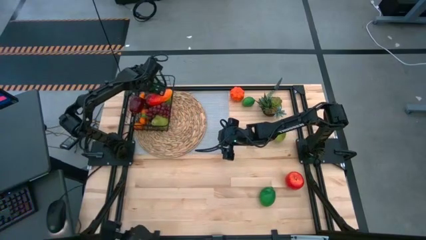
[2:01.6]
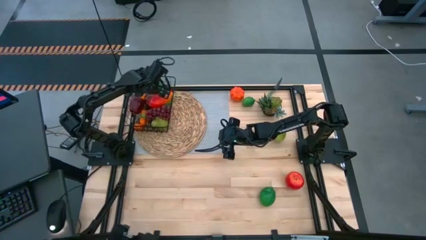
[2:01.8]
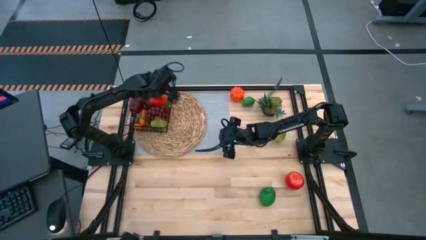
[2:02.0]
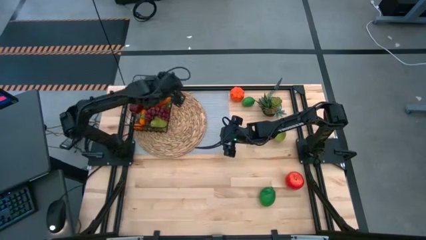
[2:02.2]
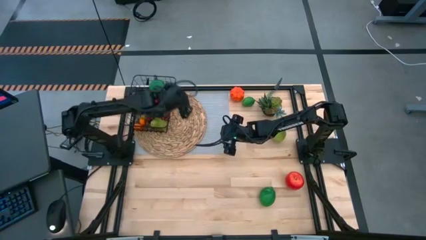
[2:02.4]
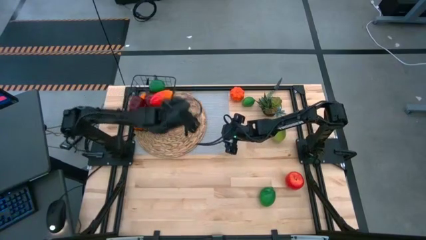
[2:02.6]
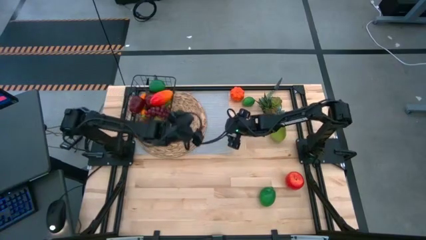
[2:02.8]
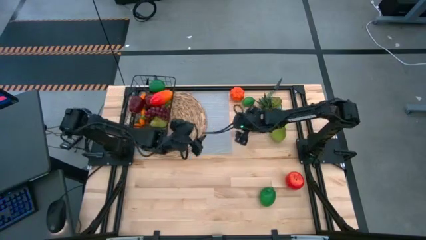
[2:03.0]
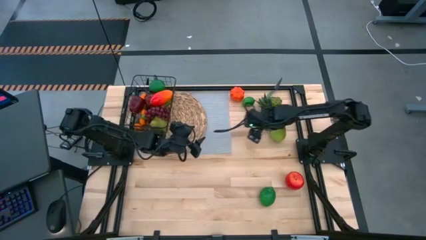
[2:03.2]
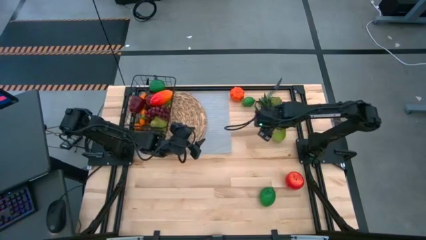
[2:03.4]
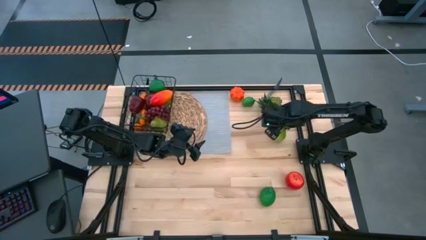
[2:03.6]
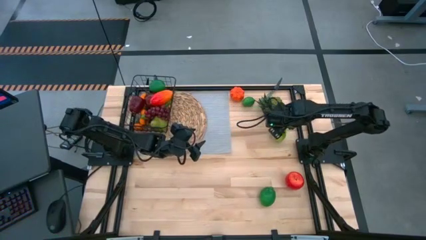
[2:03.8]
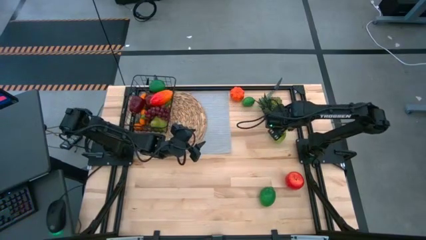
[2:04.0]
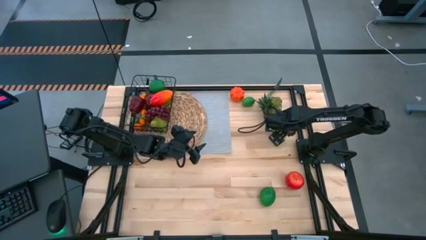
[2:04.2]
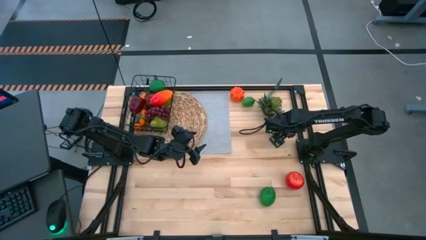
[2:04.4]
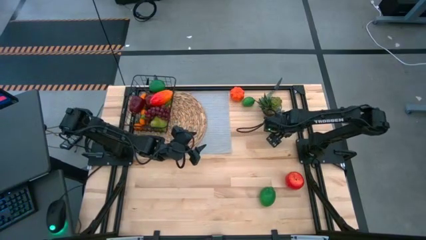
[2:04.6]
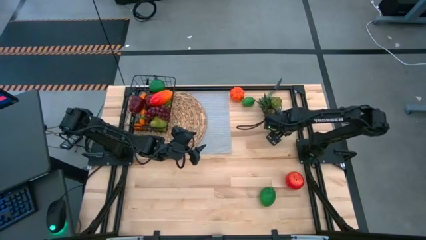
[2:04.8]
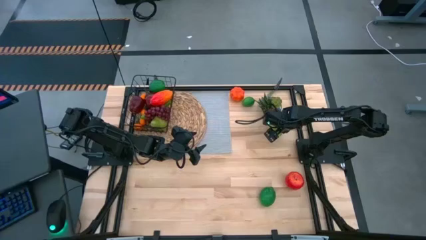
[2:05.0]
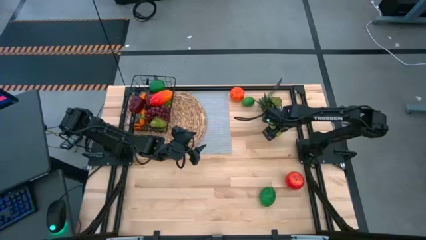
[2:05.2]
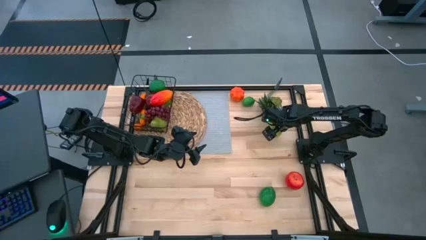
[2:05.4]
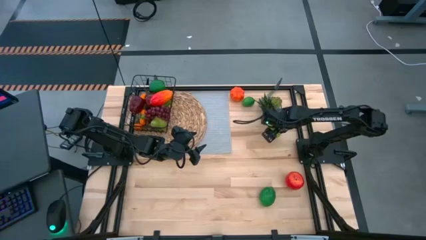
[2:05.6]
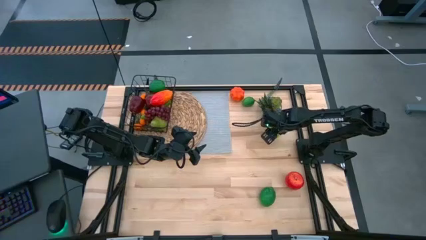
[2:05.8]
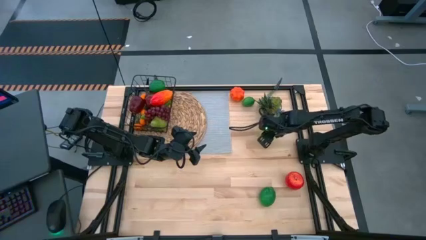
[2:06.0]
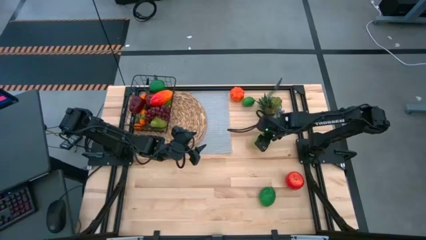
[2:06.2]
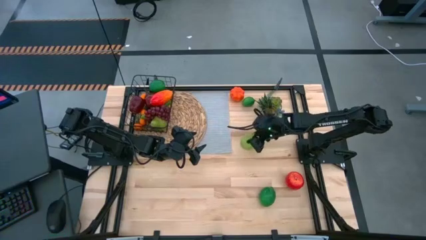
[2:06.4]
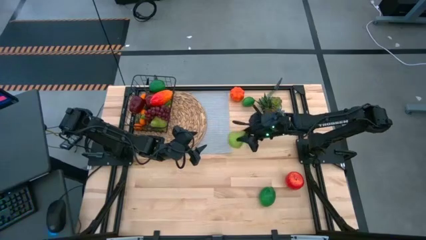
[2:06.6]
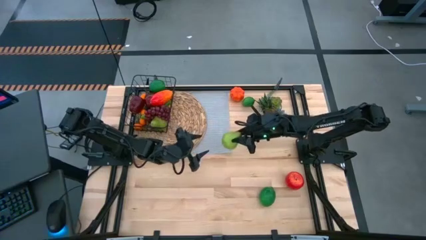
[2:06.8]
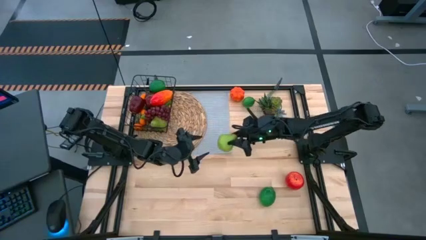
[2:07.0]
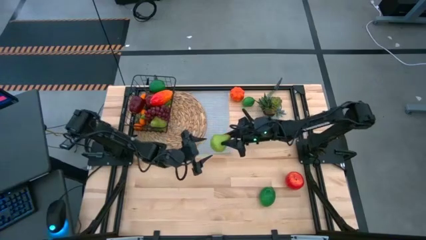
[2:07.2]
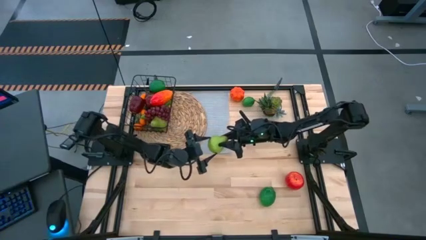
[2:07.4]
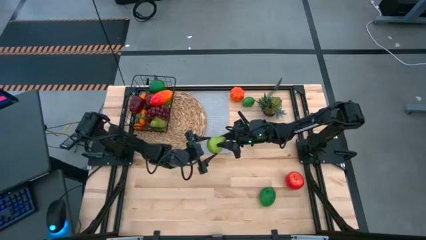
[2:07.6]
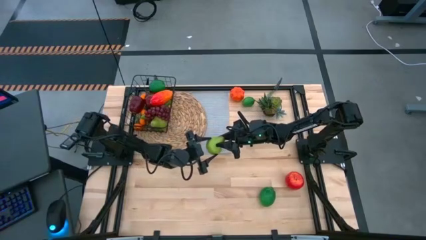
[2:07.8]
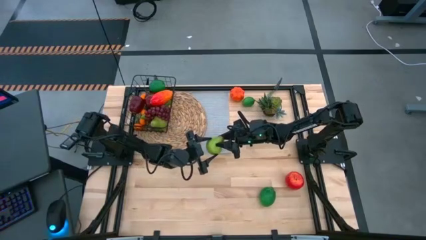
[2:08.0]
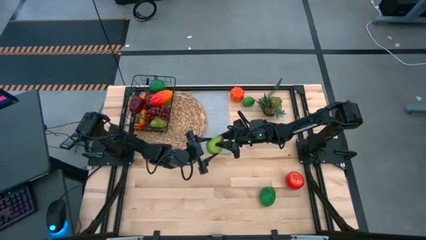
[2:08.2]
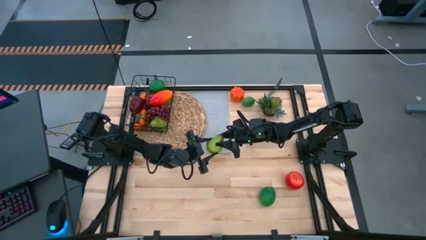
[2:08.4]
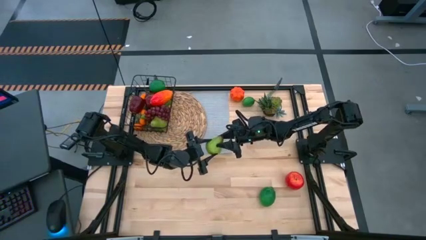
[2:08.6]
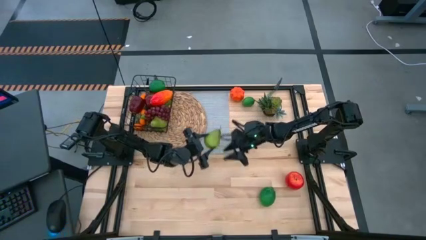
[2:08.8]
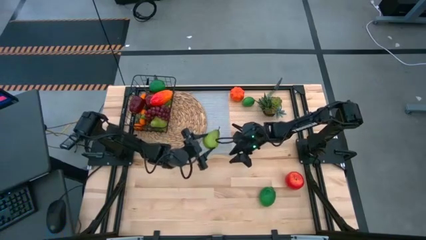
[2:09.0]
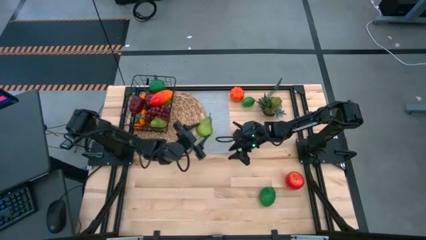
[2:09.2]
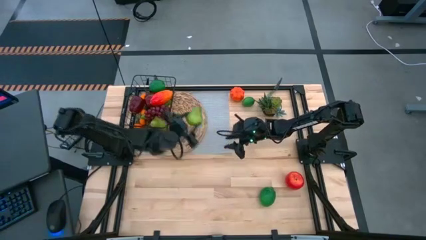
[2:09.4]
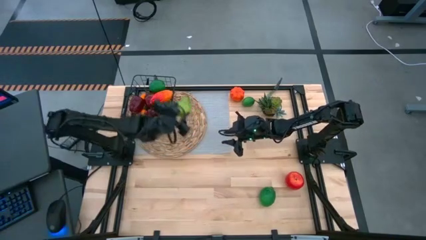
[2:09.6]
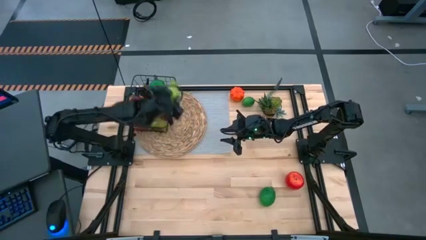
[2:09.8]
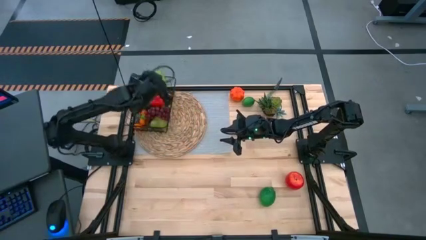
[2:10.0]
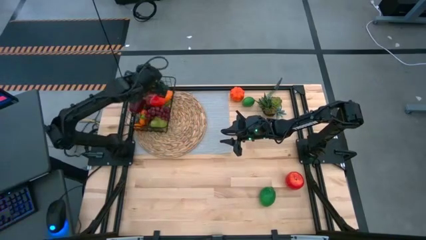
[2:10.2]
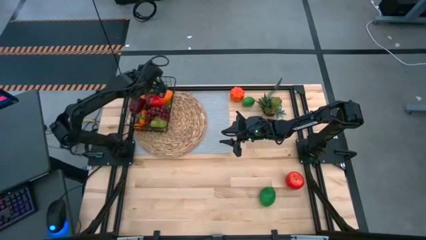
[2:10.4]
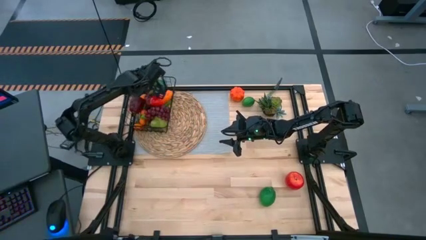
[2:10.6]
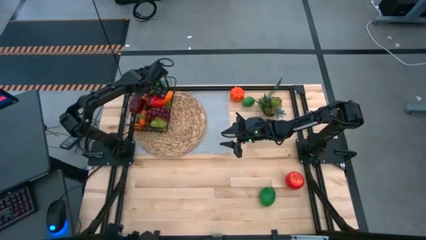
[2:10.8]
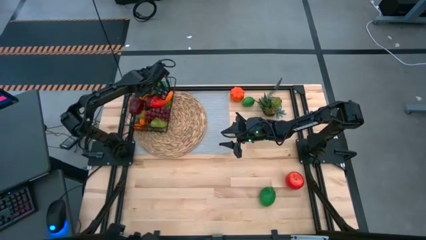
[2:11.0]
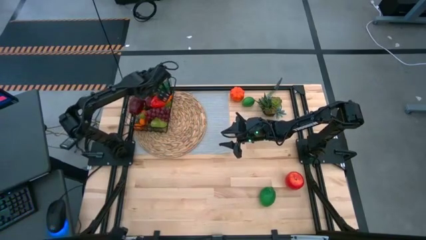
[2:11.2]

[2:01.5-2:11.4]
Task: Build produce basket
Put the green pear into the wire basket
